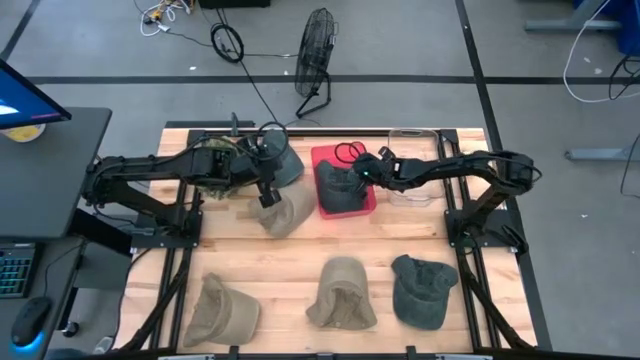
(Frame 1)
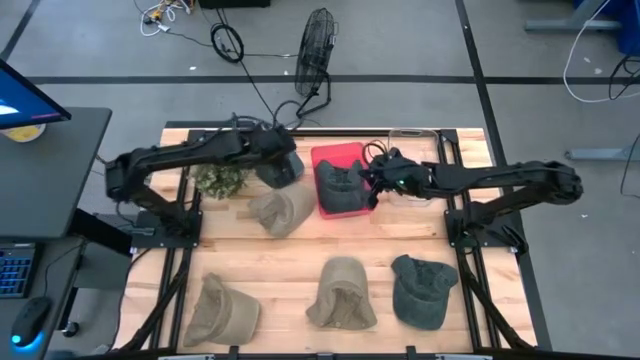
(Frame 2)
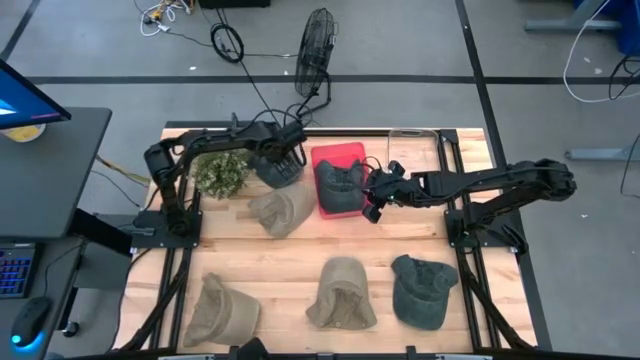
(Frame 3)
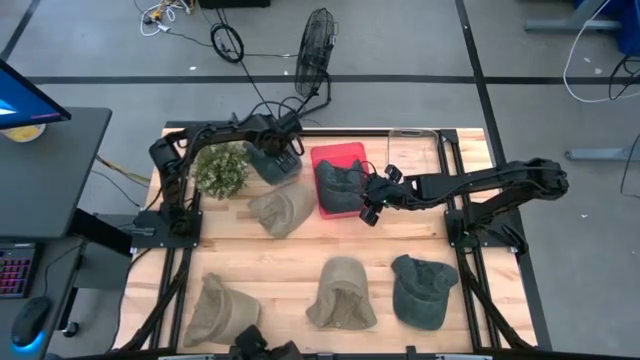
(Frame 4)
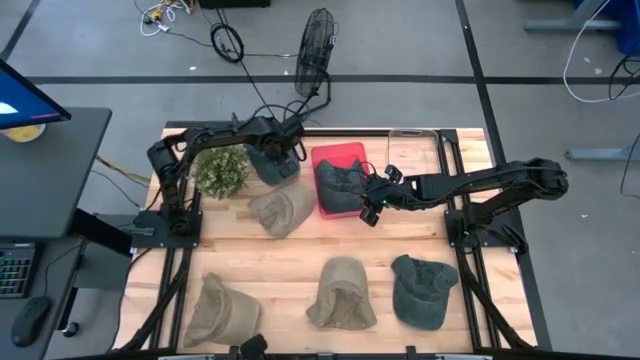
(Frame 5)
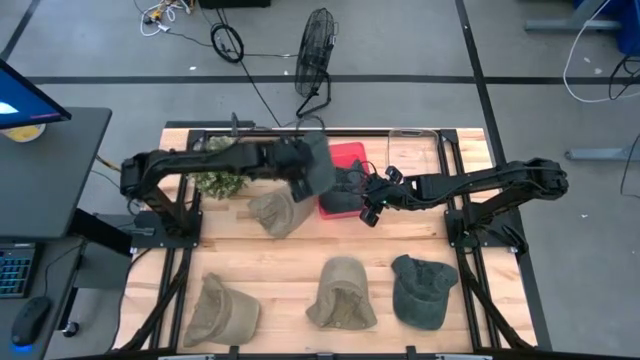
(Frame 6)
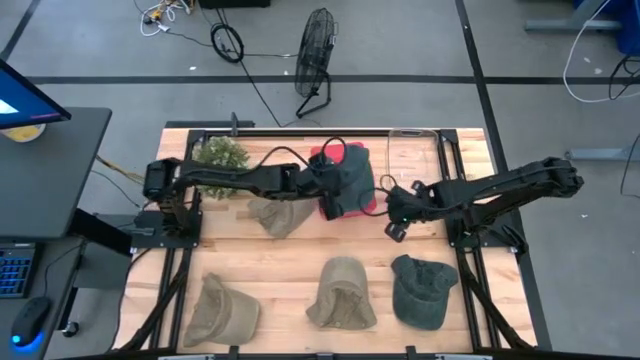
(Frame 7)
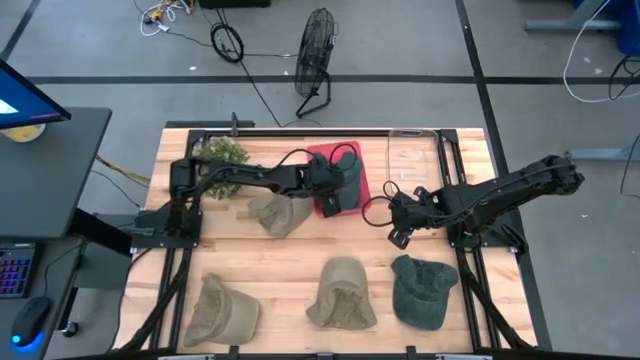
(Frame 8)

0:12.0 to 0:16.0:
Task: Pick & Place hat
Put the top black cap into the pink bin

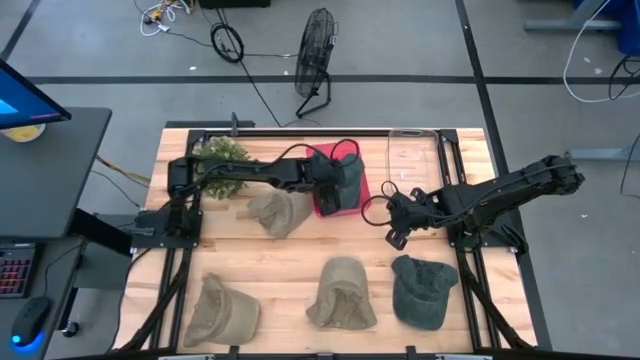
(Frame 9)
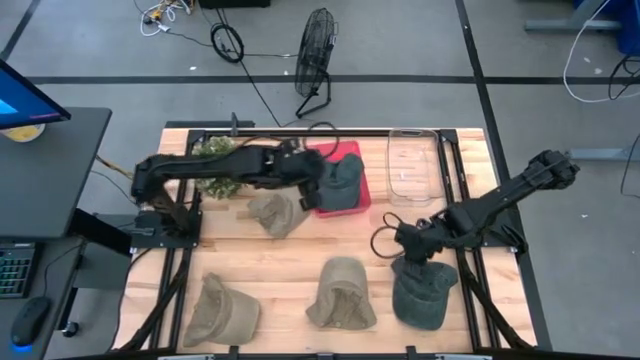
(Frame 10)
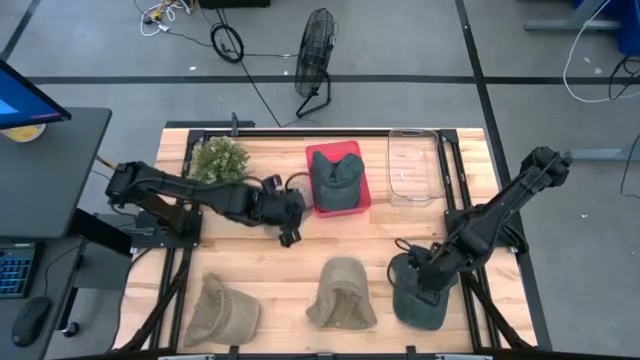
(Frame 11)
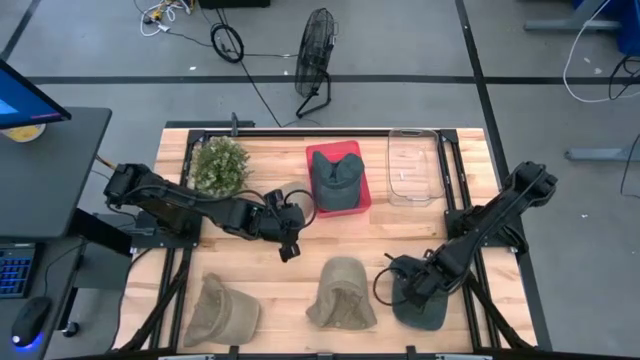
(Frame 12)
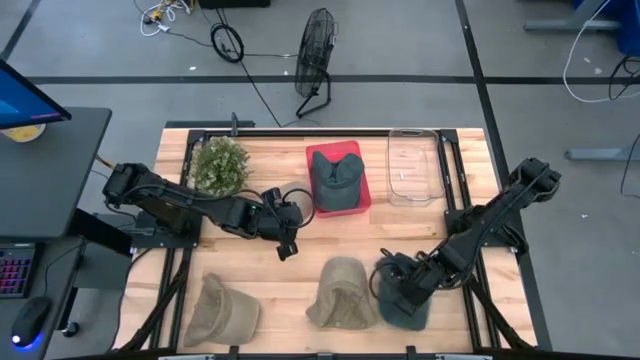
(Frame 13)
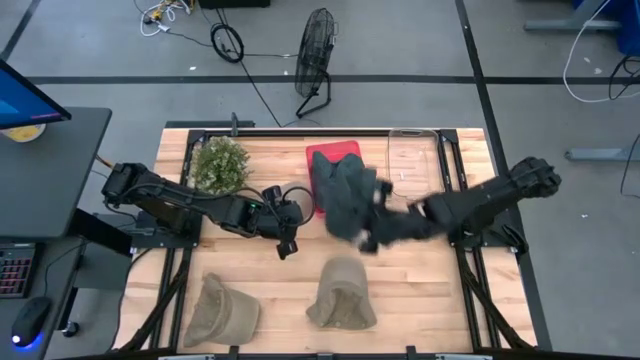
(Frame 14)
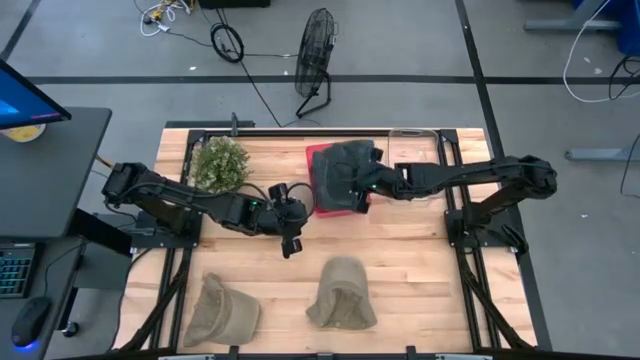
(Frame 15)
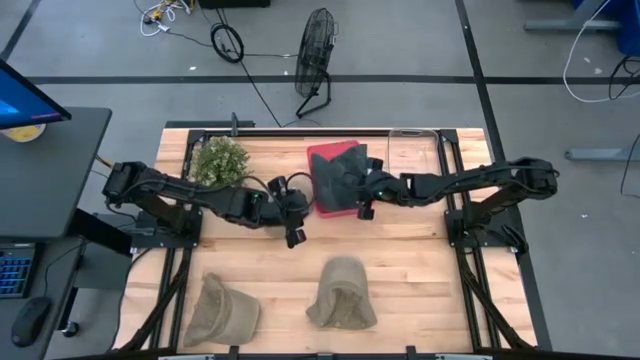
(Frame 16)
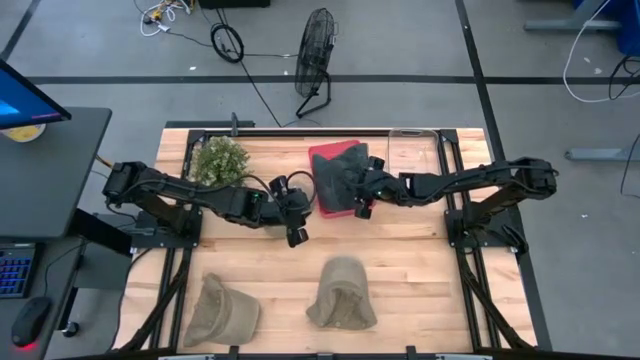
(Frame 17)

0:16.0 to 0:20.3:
Put the black cap into the pink bin

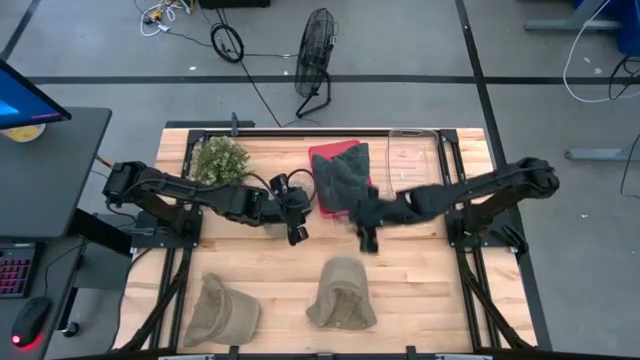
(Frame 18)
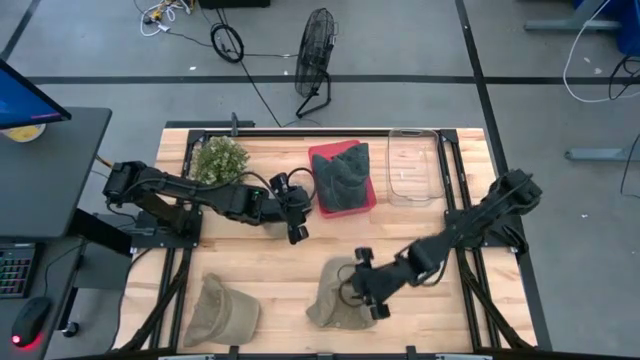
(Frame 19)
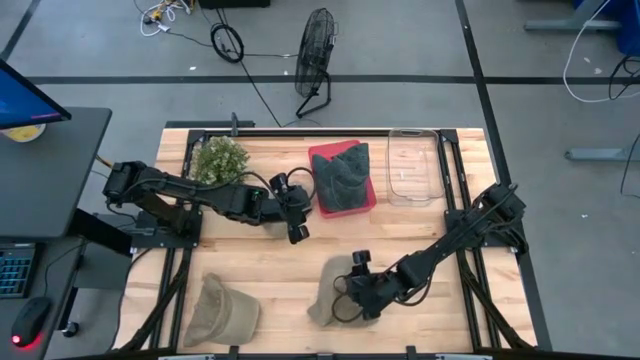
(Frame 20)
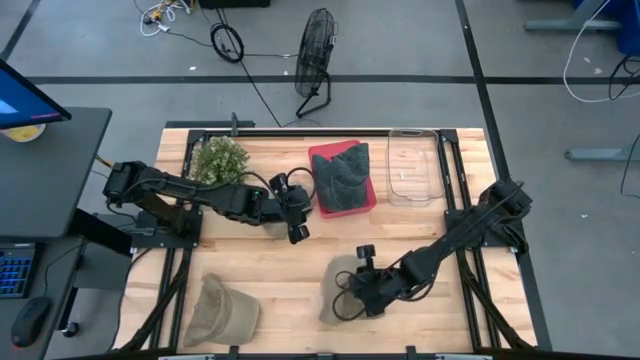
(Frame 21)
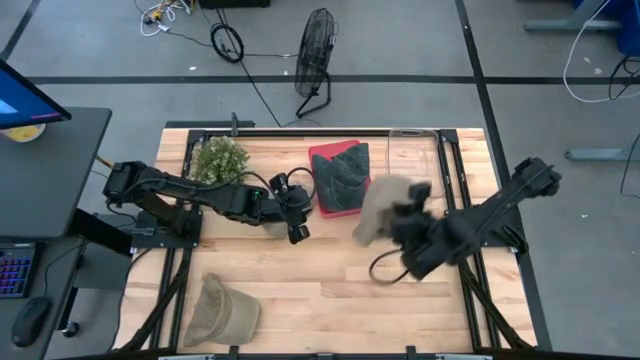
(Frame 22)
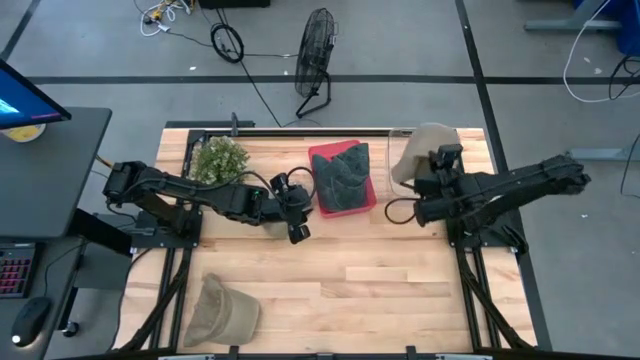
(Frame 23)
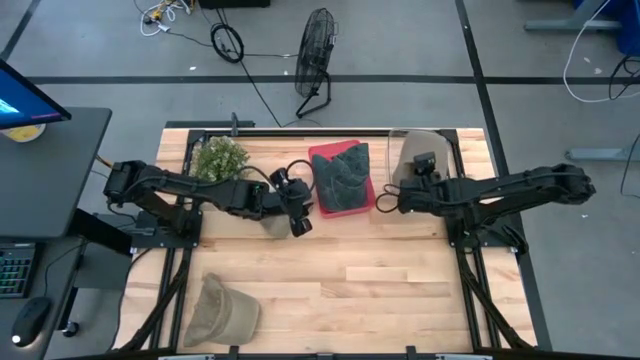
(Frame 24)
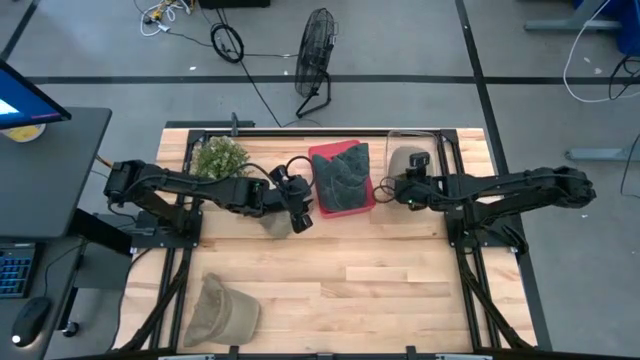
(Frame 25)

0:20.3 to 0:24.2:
Put the bottom right brown cap into the transparent bin

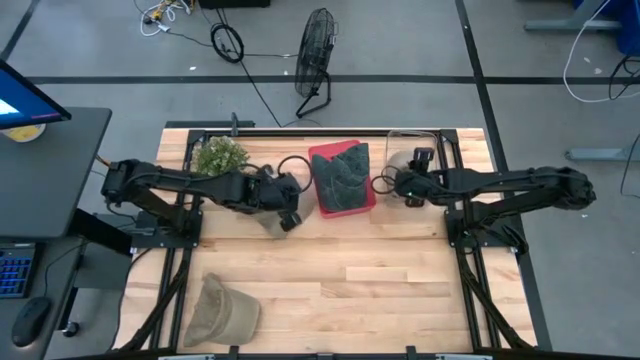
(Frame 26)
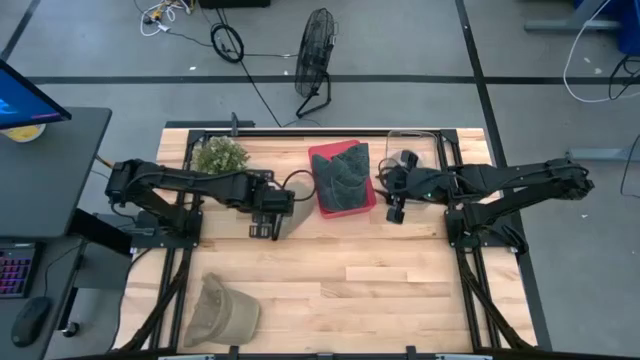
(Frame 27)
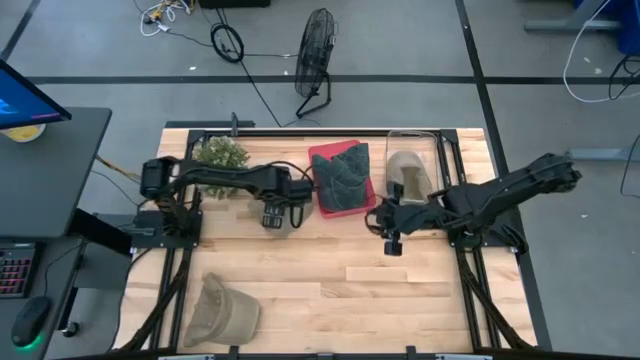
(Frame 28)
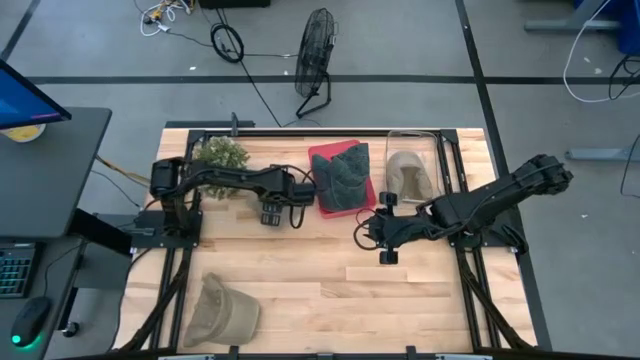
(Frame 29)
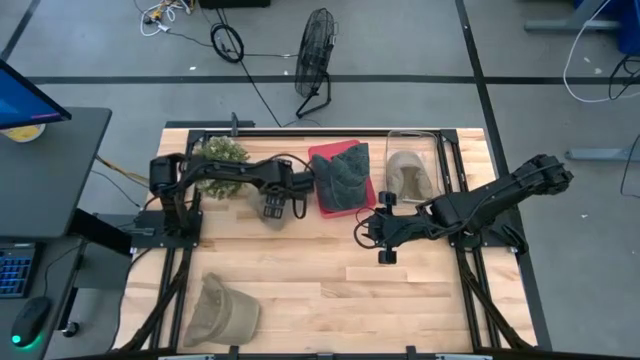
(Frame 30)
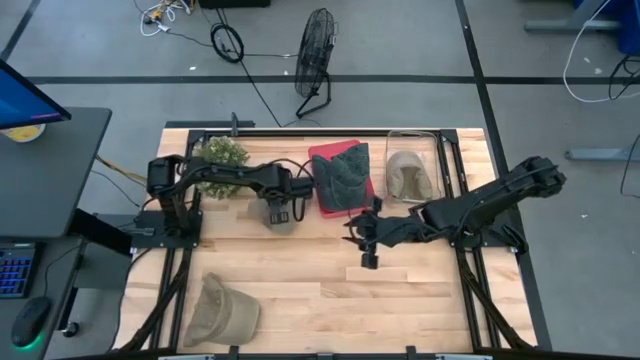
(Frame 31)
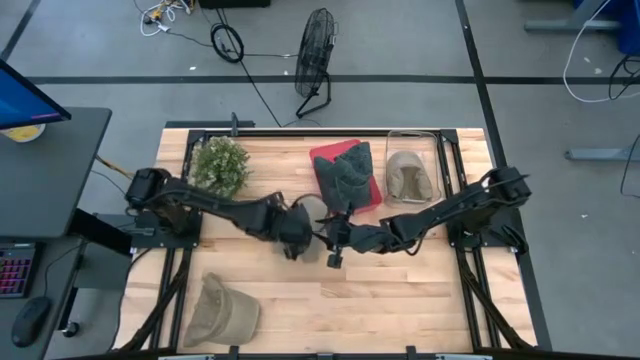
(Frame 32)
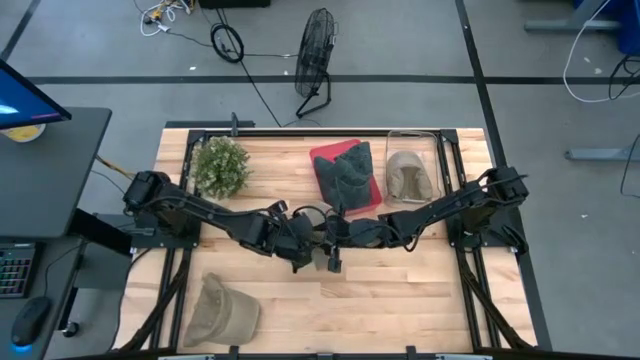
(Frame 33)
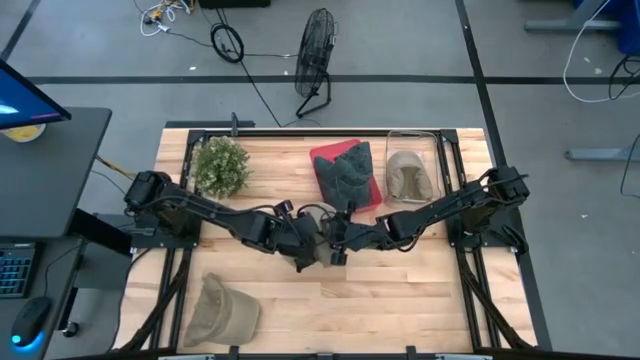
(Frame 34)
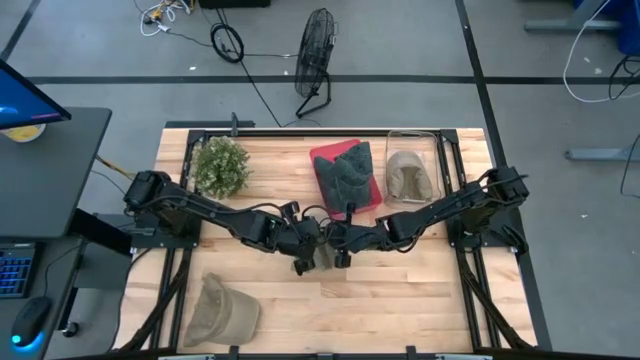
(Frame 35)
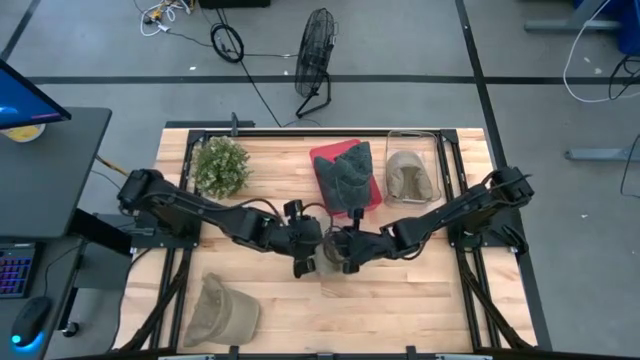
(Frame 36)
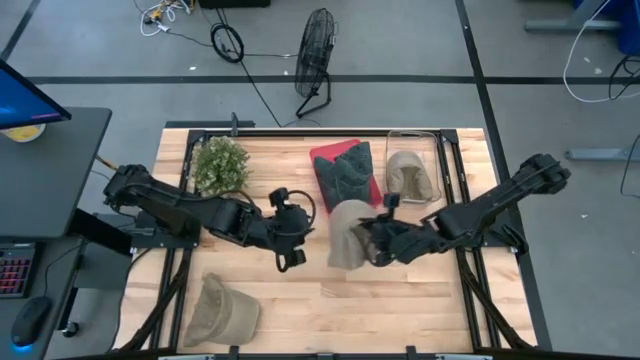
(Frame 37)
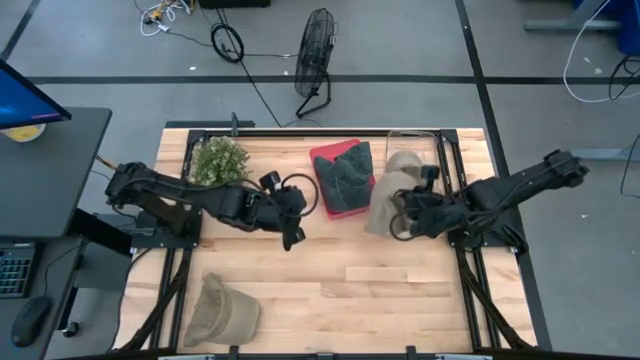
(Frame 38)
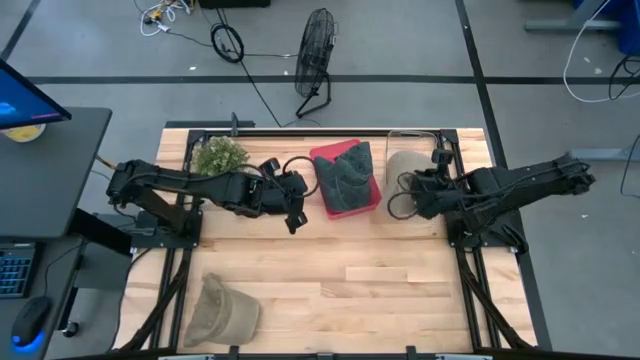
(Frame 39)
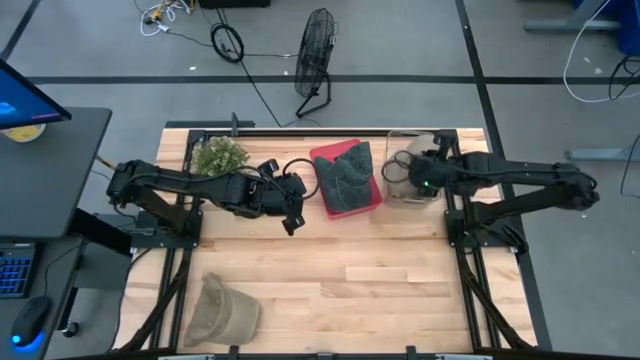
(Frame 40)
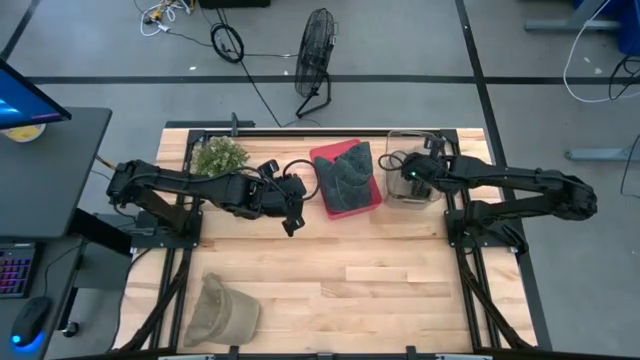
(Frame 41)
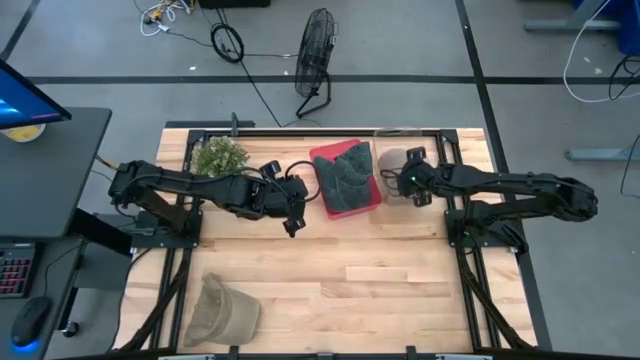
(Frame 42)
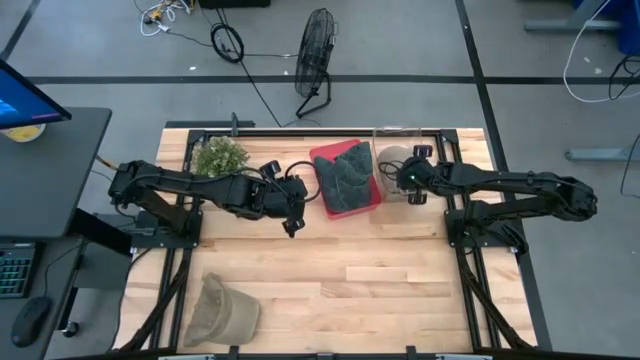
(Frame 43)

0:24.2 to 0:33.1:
Put the top brown cap into the transparent bin
